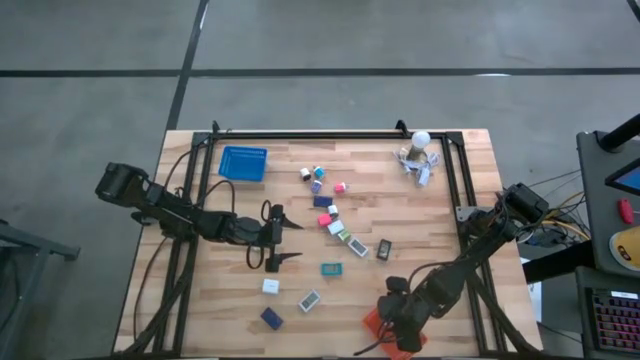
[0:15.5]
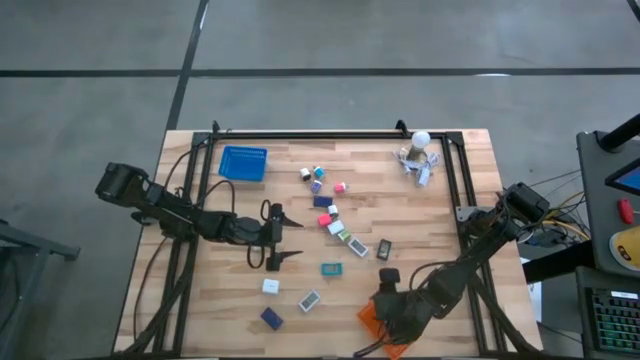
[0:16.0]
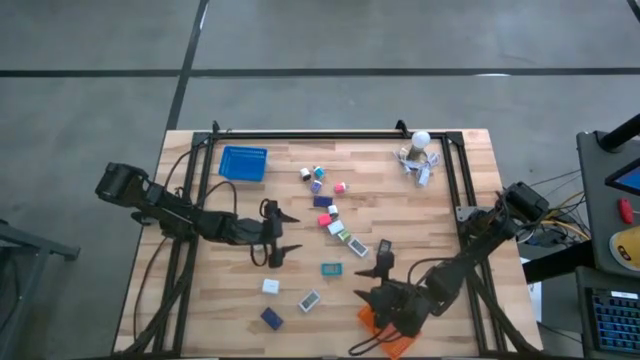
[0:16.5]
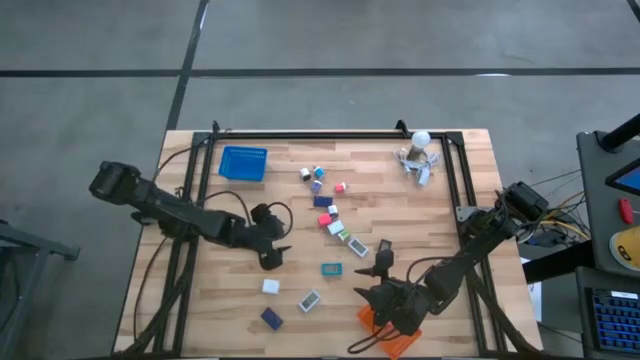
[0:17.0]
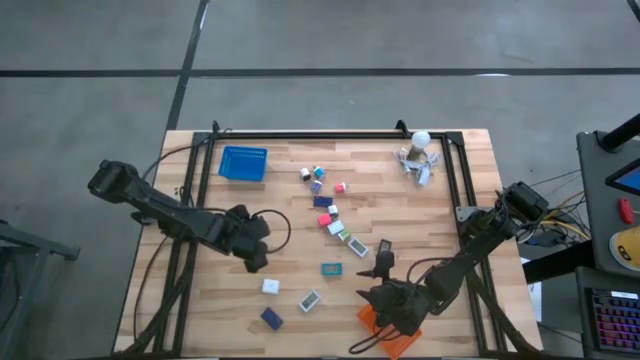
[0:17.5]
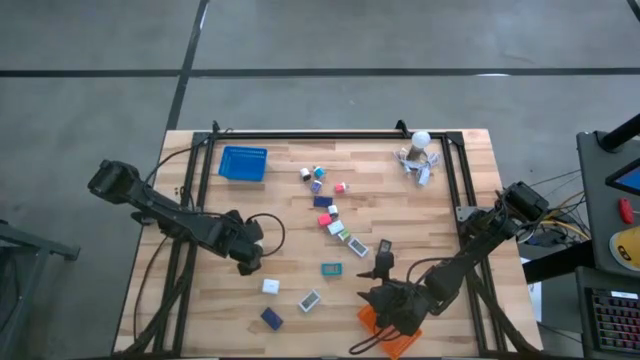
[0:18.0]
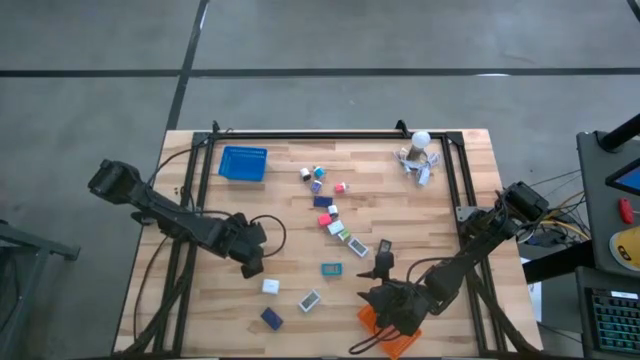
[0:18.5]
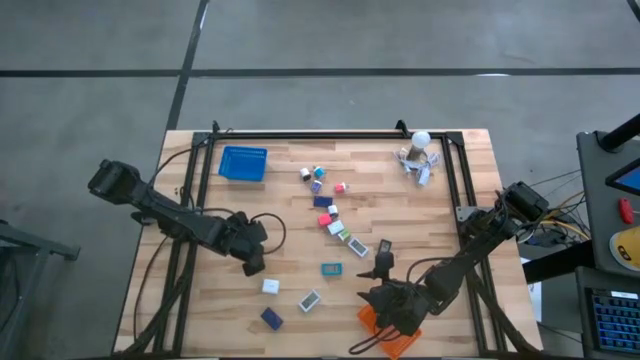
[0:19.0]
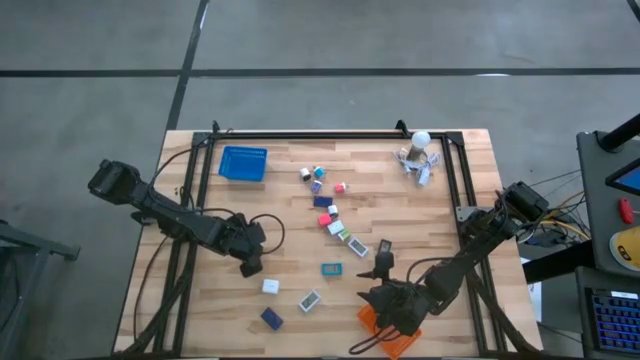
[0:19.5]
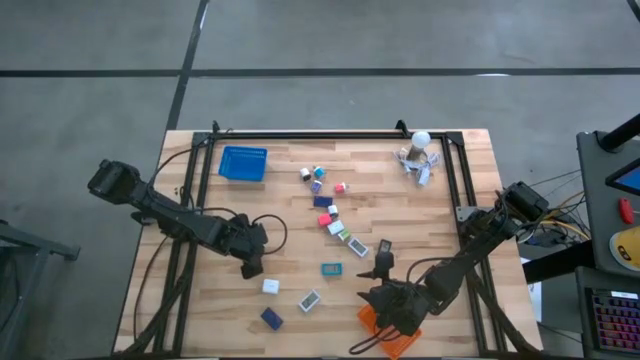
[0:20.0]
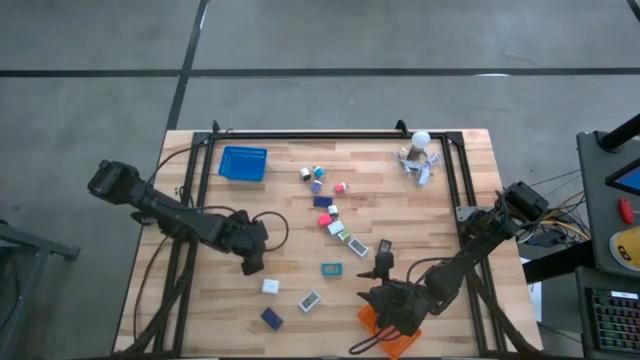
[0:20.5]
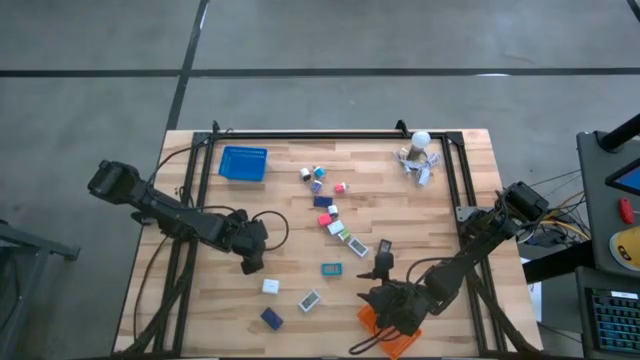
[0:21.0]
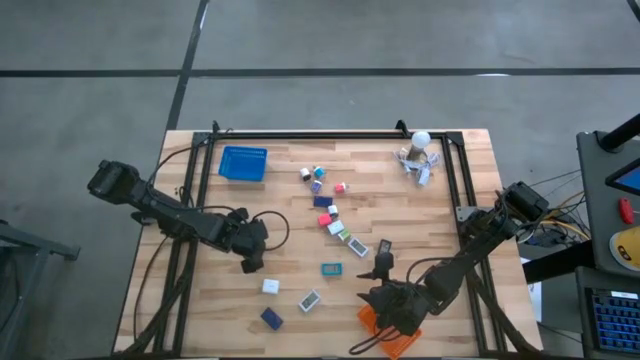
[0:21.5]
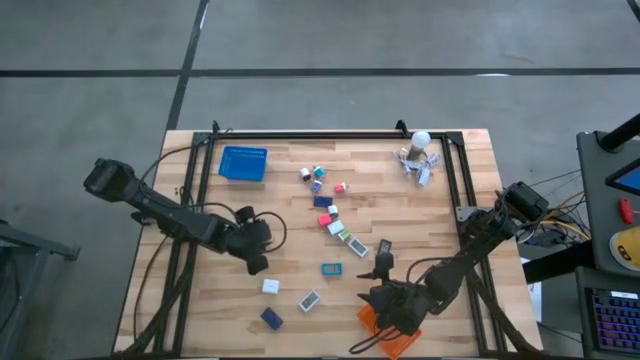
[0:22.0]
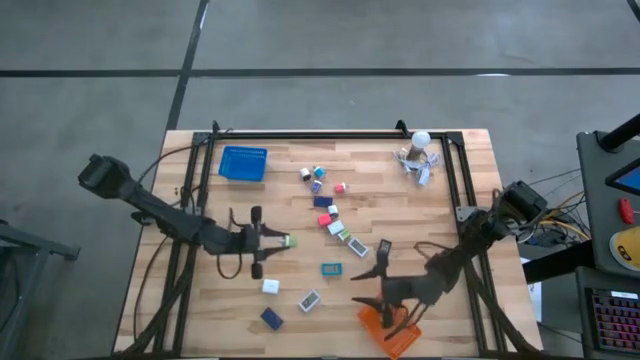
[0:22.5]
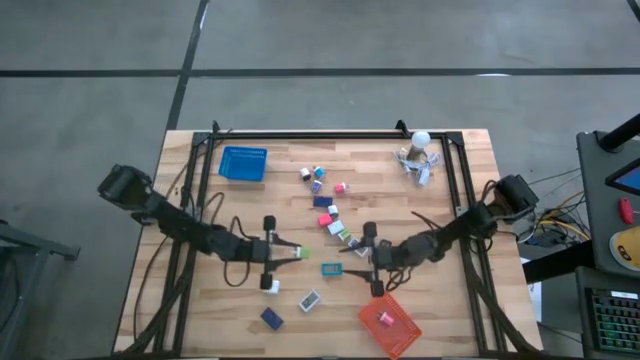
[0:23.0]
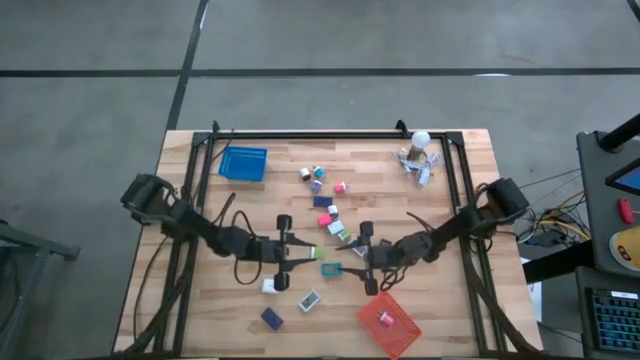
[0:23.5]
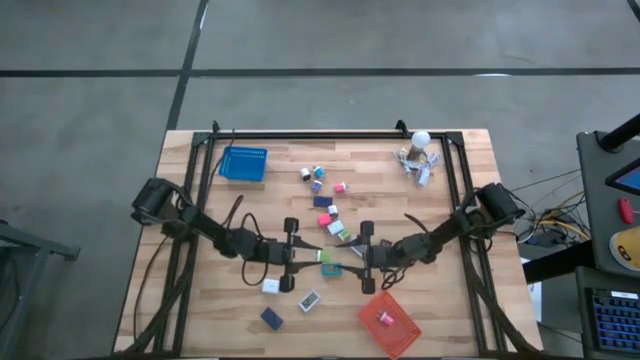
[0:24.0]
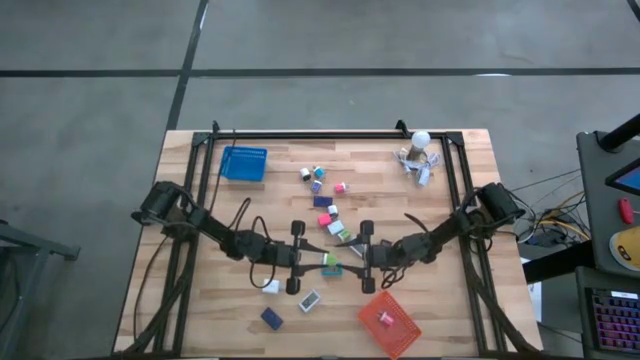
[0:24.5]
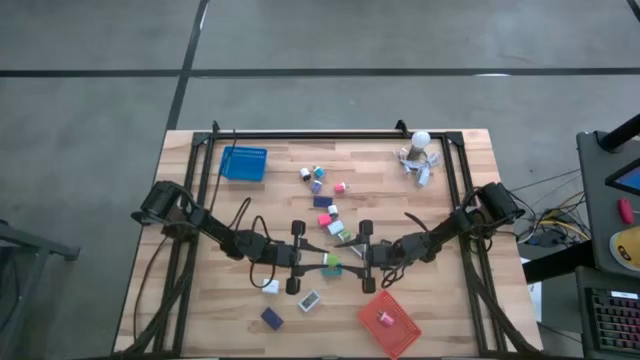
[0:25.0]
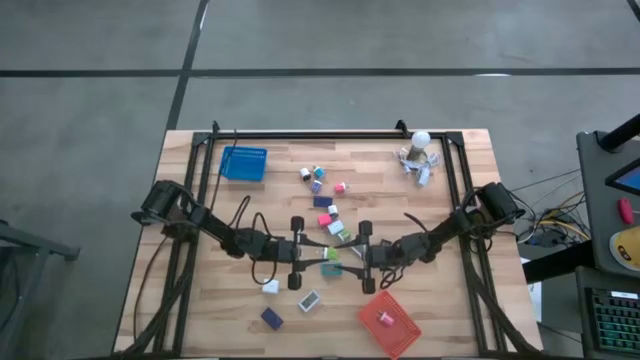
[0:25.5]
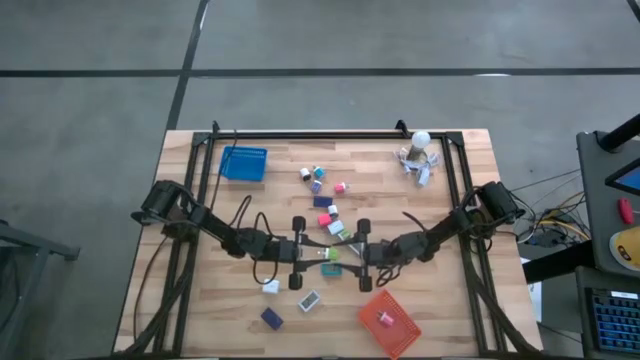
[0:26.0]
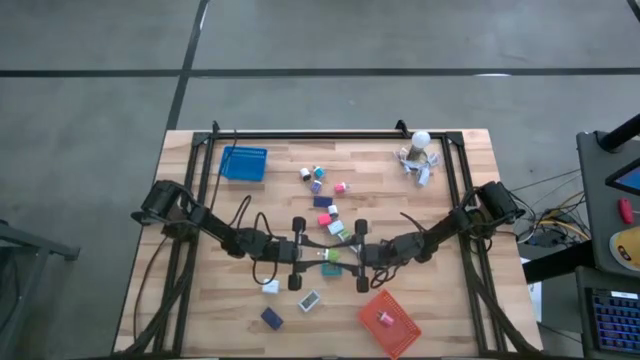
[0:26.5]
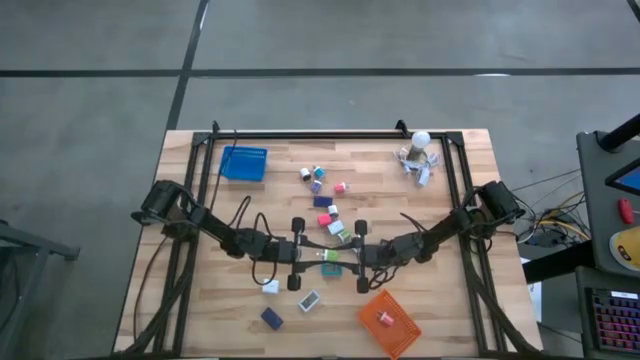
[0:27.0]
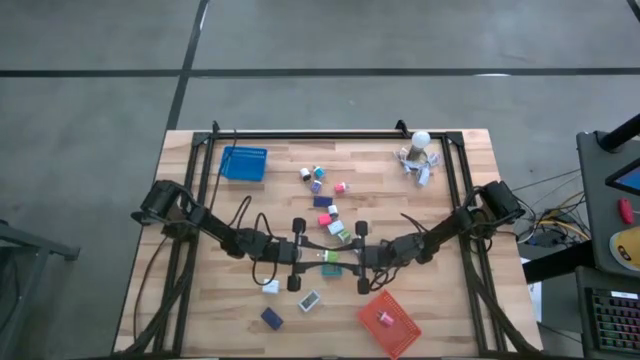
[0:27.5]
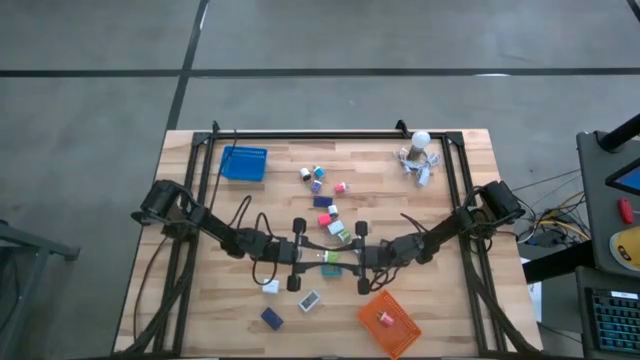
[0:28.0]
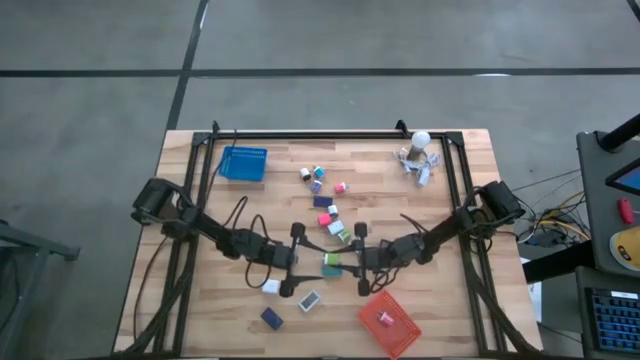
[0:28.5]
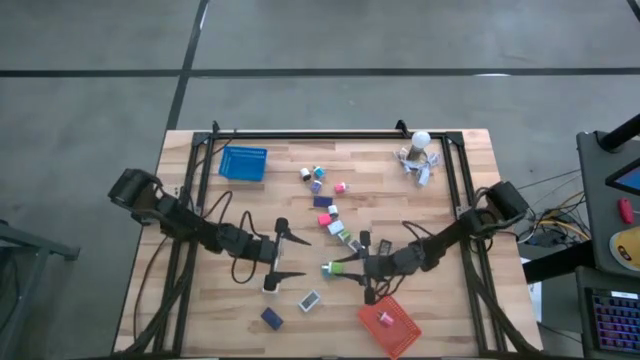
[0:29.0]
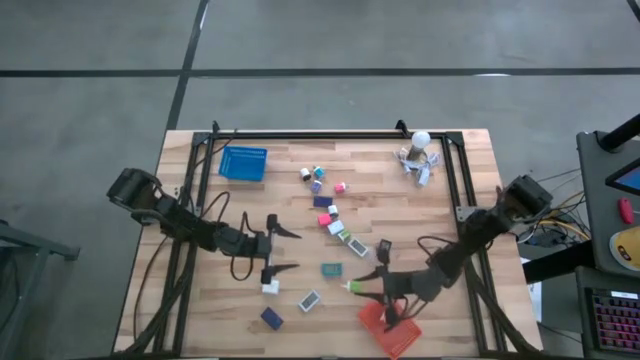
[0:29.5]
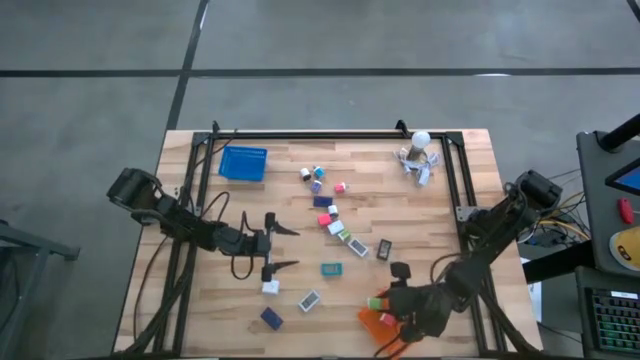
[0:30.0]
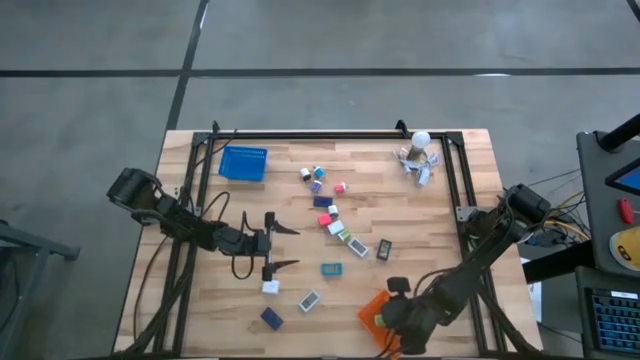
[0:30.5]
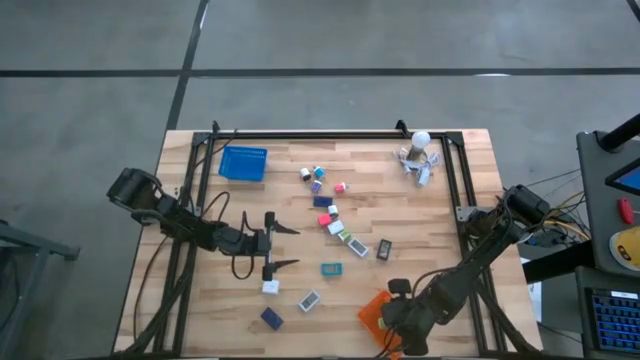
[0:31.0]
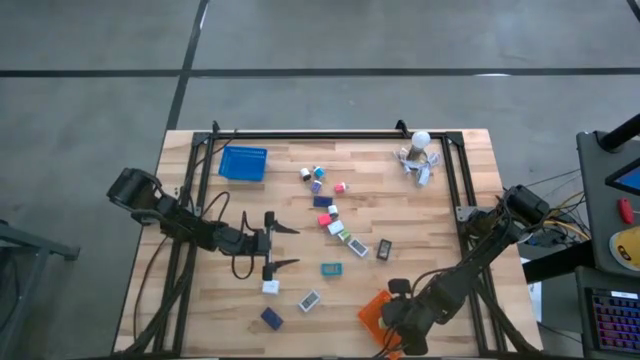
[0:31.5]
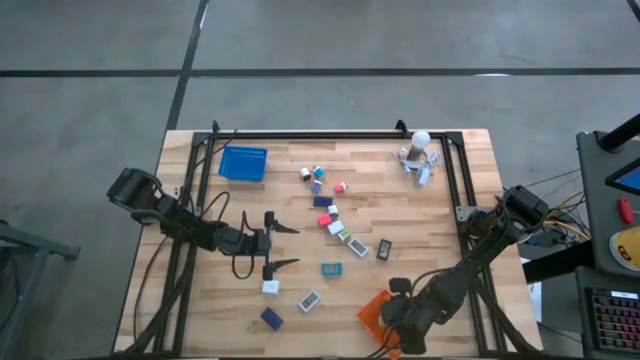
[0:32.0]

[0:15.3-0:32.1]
Task: Pick & Place Office items
Put the left green charger adapter into the orange bin

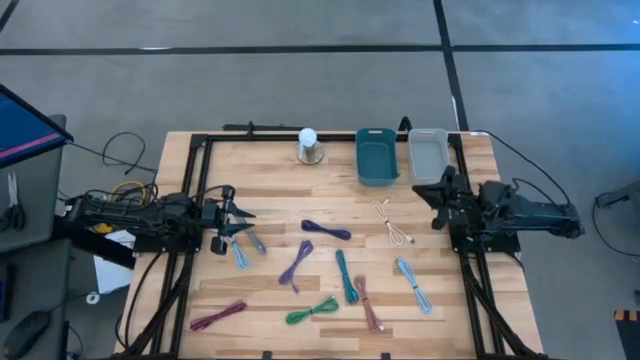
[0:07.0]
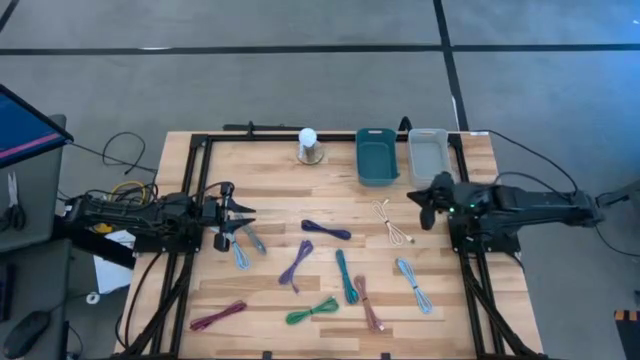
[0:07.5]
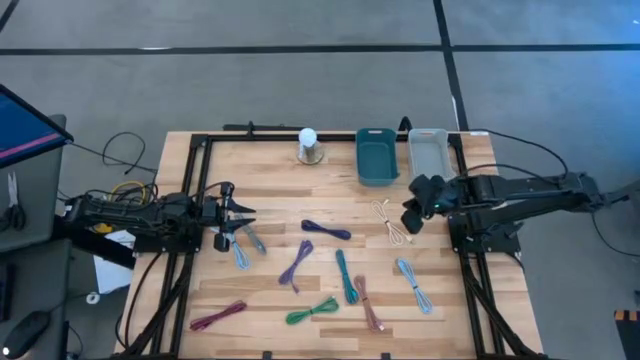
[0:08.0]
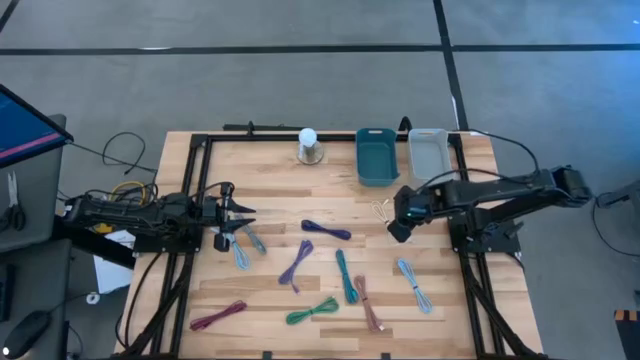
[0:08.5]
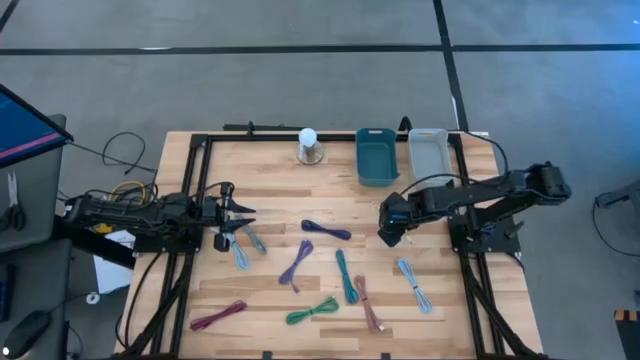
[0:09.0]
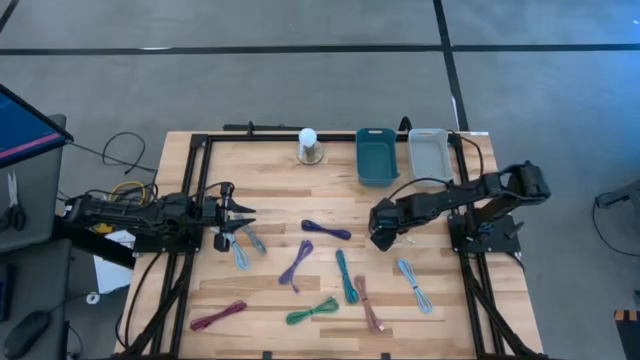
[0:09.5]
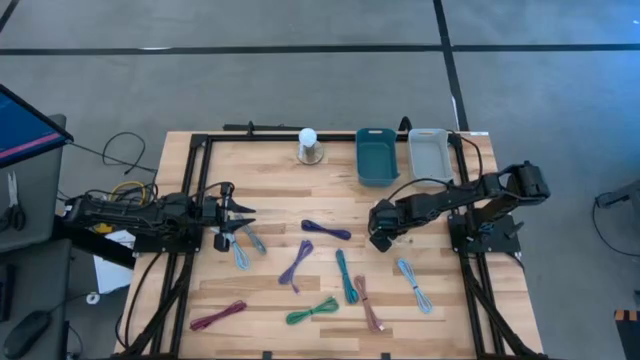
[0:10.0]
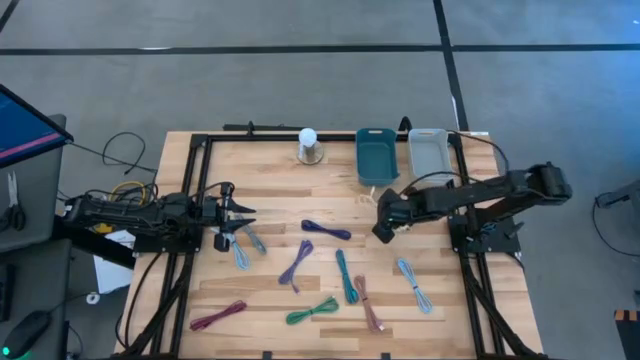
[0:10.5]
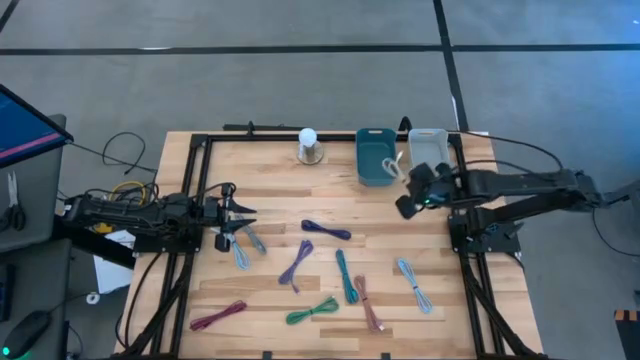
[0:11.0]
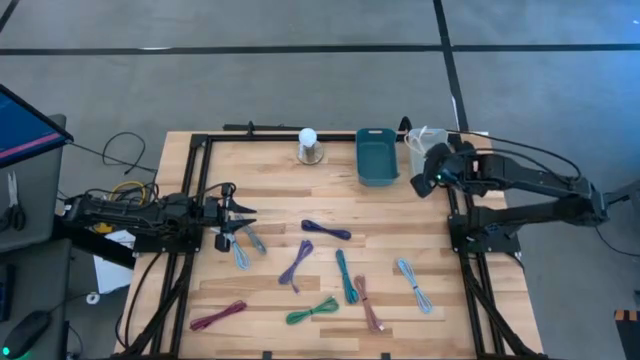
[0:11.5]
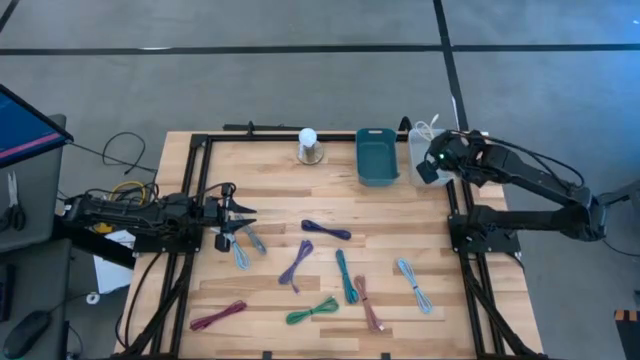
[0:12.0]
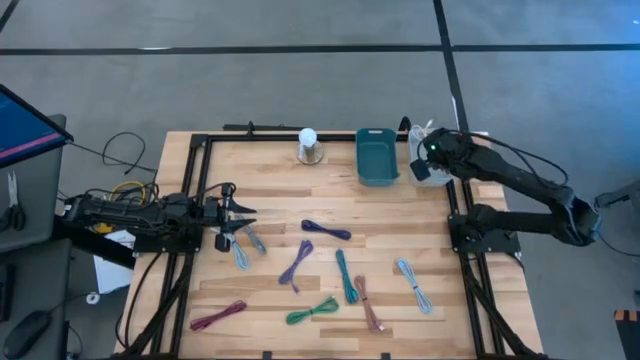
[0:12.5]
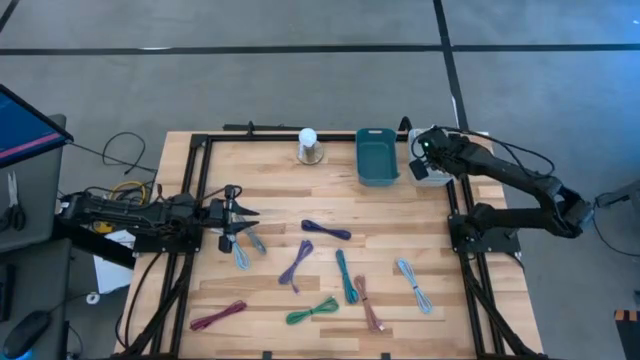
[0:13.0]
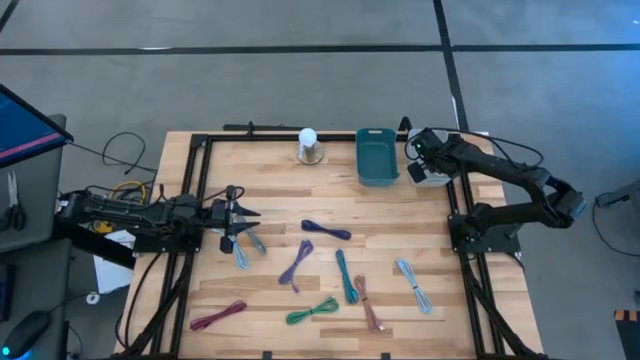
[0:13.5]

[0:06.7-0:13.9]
Task: Pick & Place USB Port
Put the white charger cable into the gray bin
